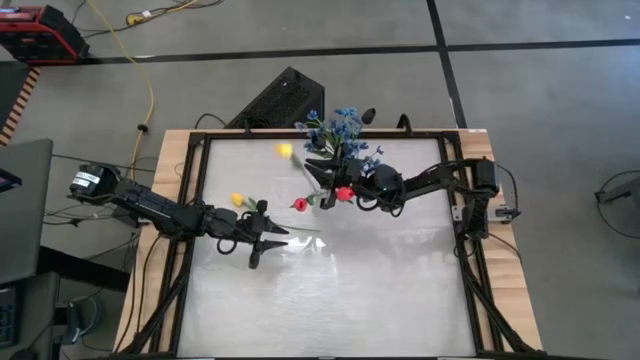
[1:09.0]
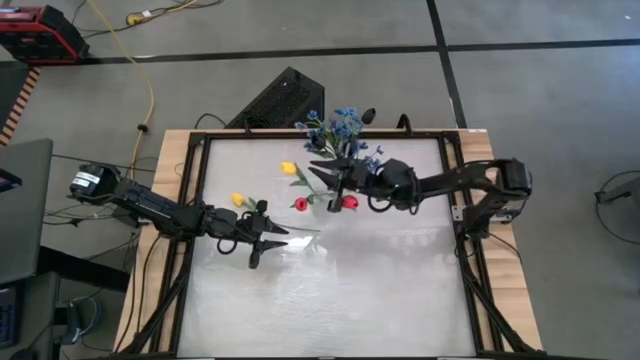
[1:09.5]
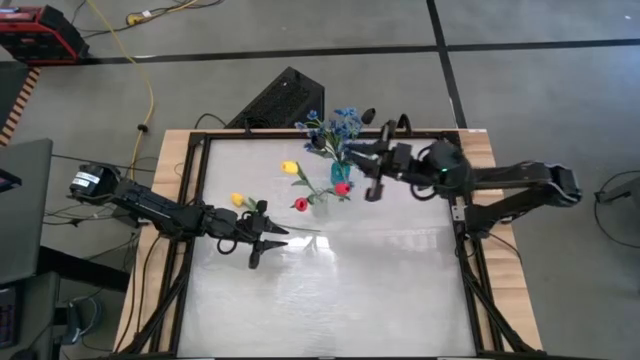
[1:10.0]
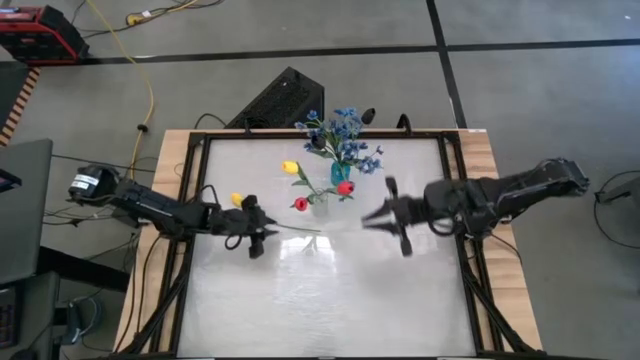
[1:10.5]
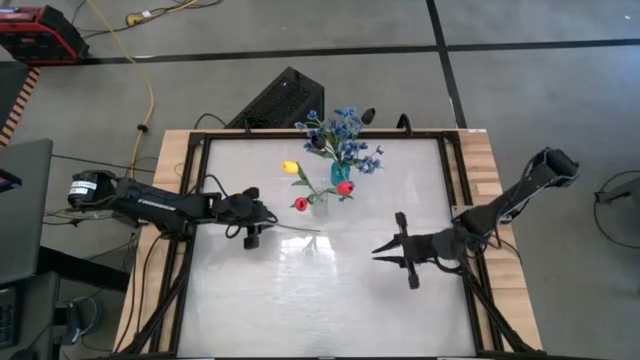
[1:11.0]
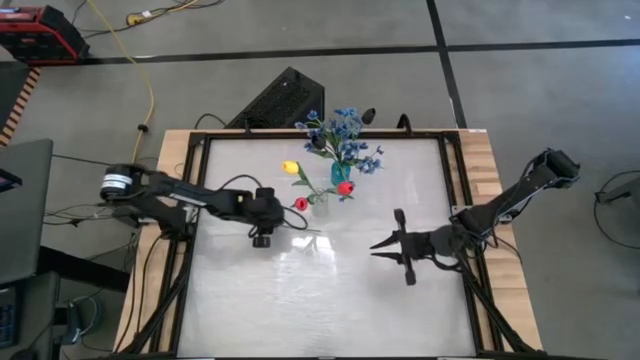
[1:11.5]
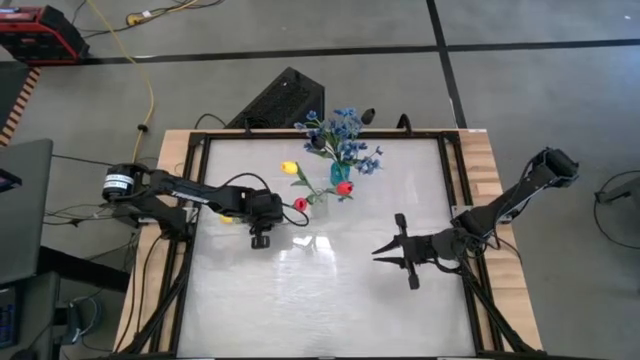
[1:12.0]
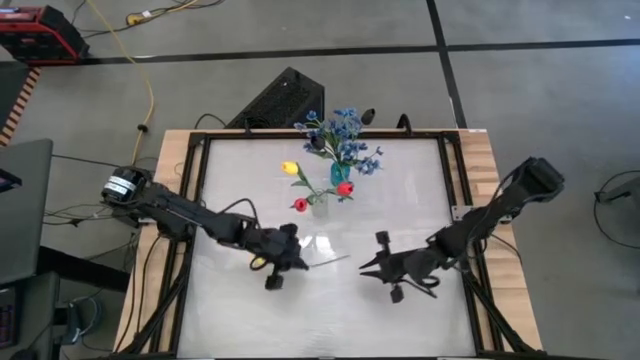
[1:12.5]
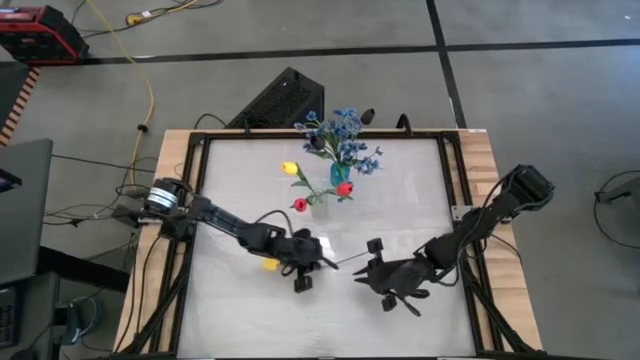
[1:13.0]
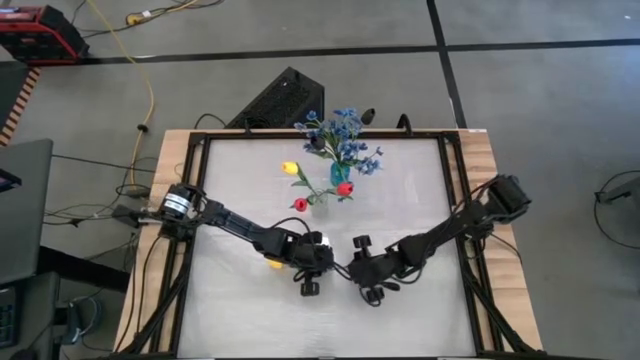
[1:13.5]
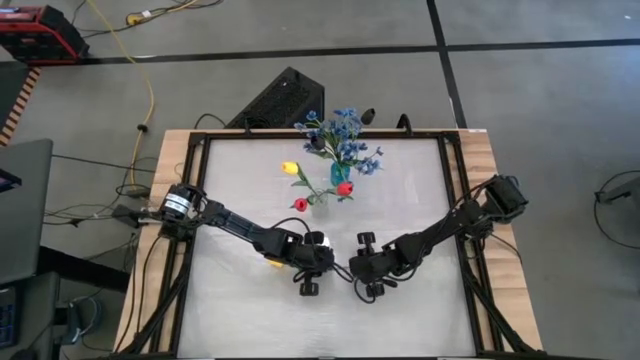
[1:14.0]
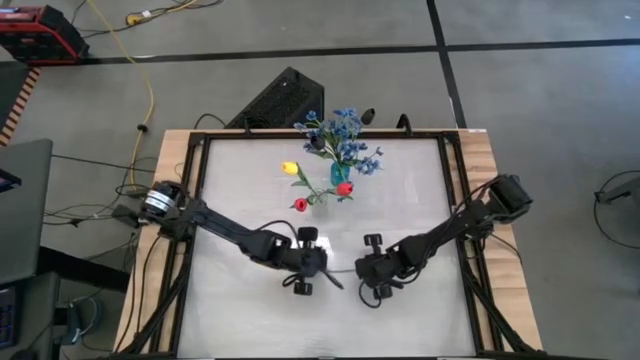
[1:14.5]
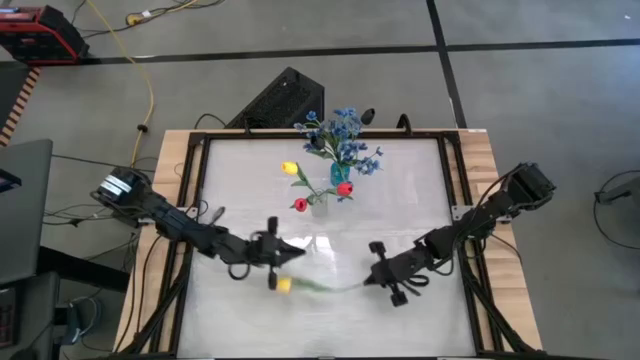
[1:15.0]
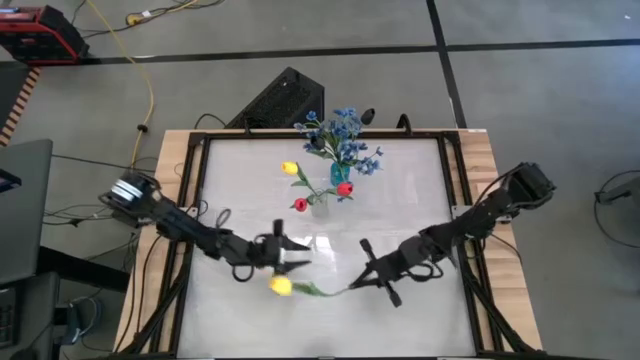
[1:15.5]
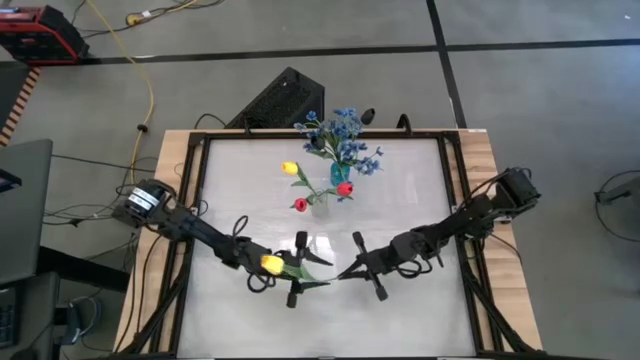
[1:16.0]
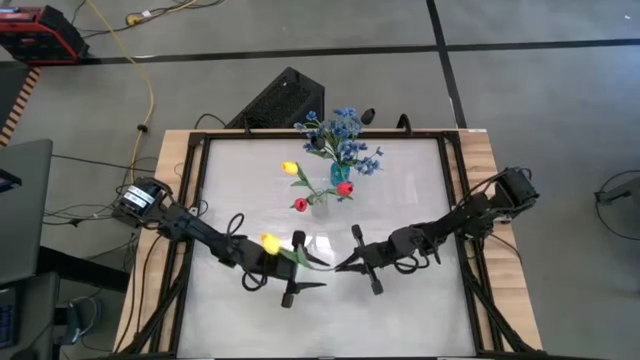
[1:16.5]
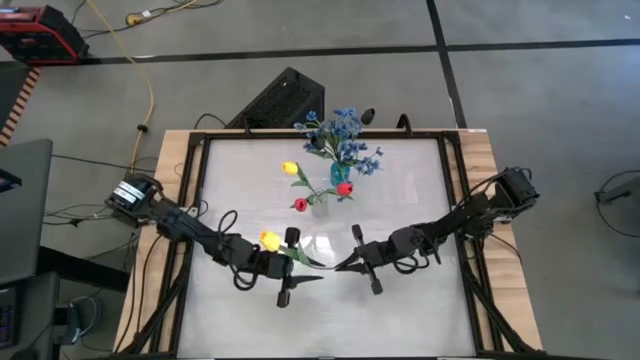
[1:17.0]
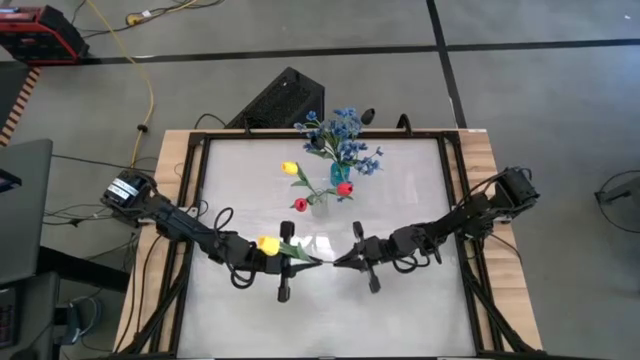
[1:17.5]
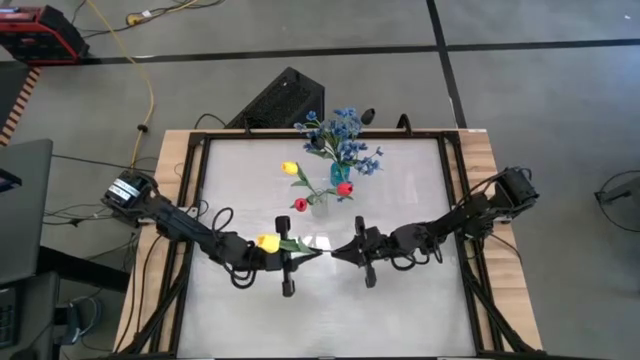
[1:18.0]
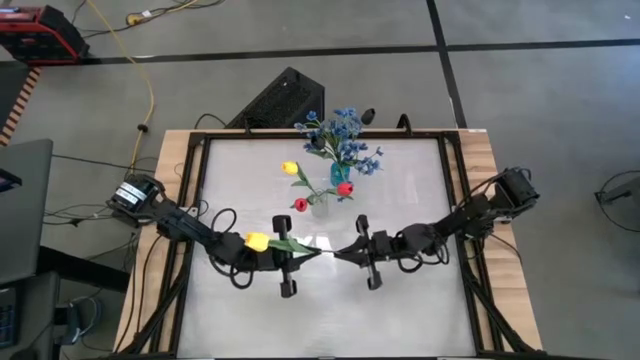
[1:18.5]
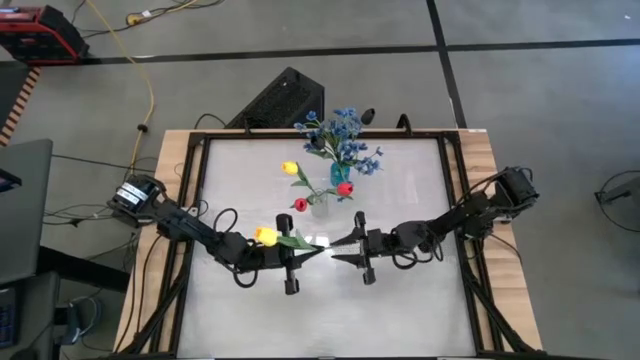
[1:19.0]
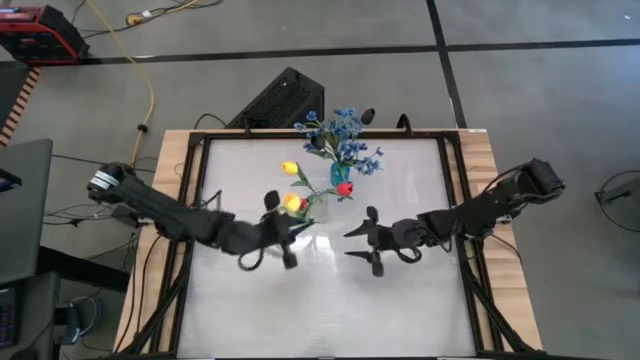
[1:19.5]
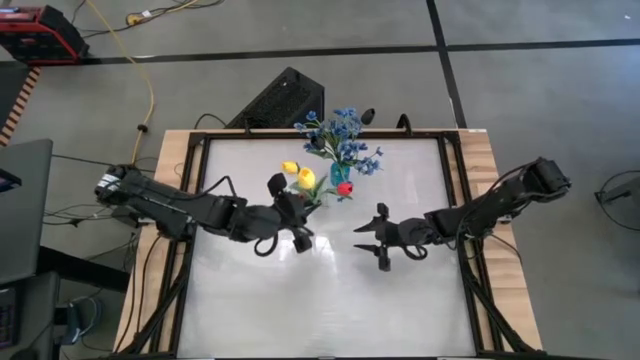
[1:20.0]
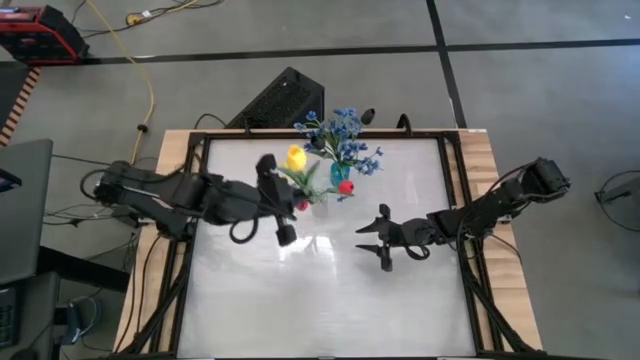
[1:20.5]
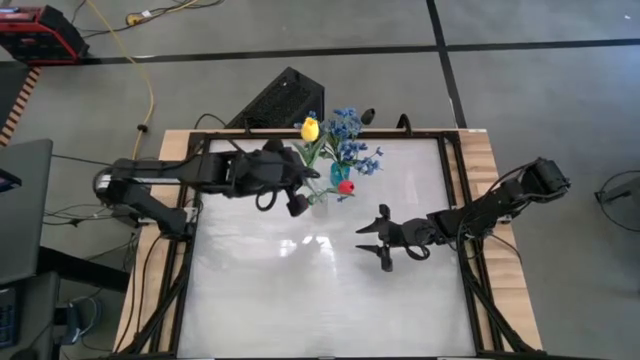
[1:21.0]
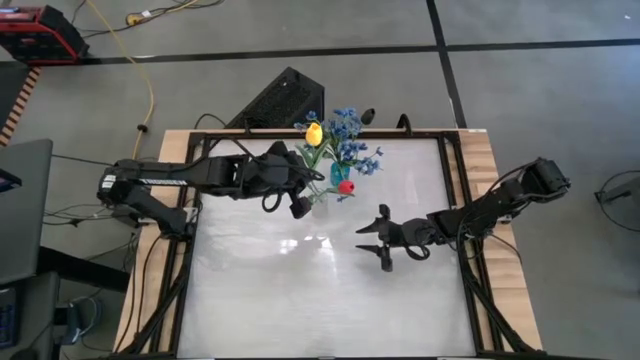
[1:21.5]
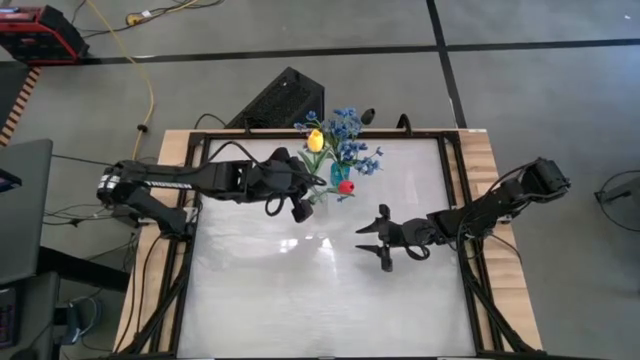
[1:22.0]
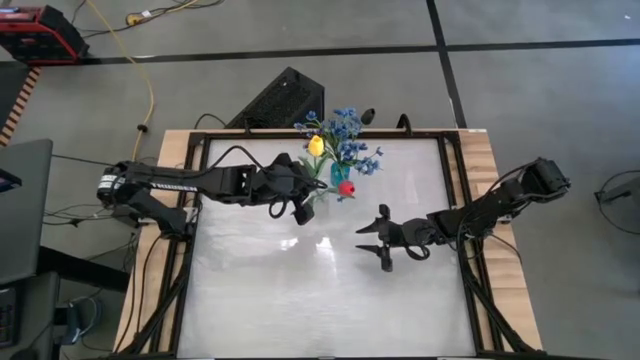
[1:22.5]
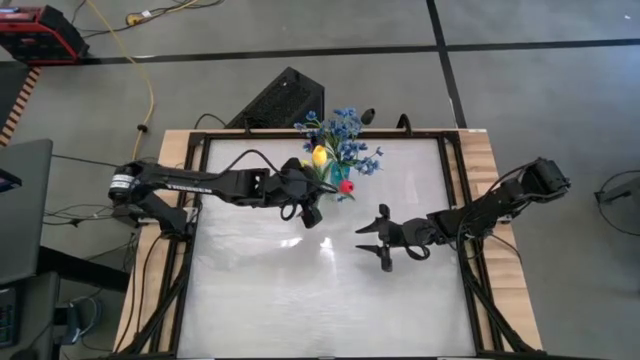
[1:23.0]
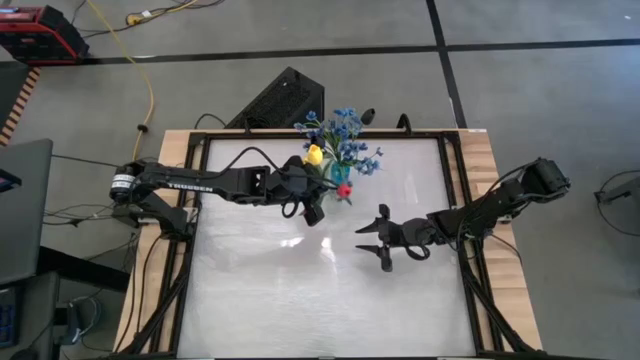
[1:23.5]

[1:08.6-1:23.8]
Task: Sort flowers into vase by color
Put the yellow flower into the transparent vase

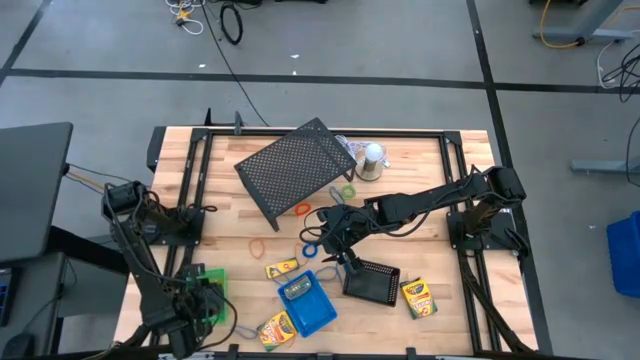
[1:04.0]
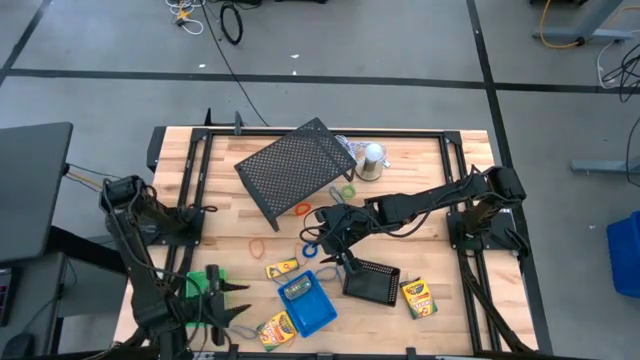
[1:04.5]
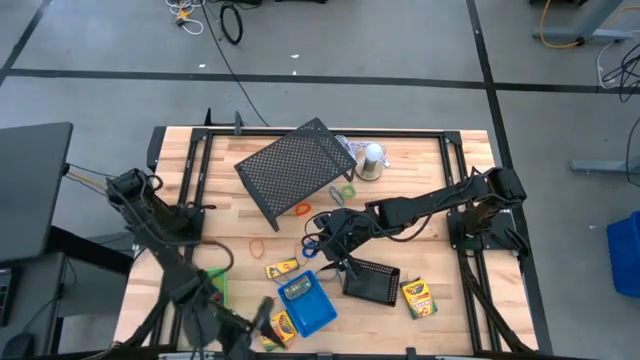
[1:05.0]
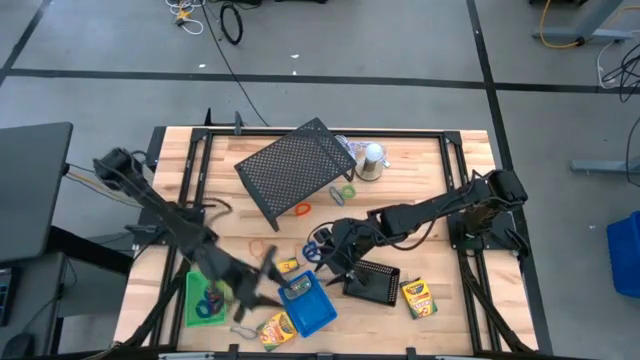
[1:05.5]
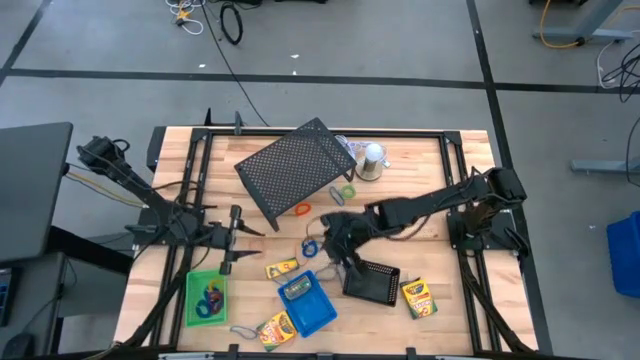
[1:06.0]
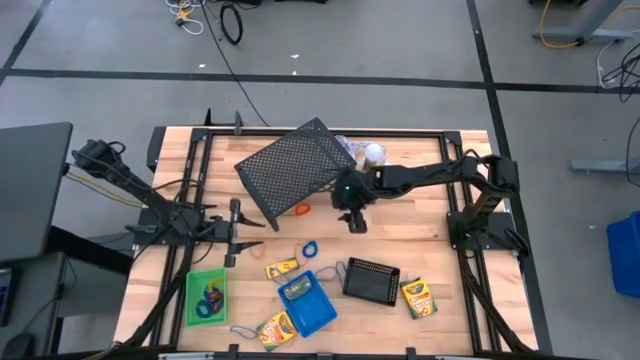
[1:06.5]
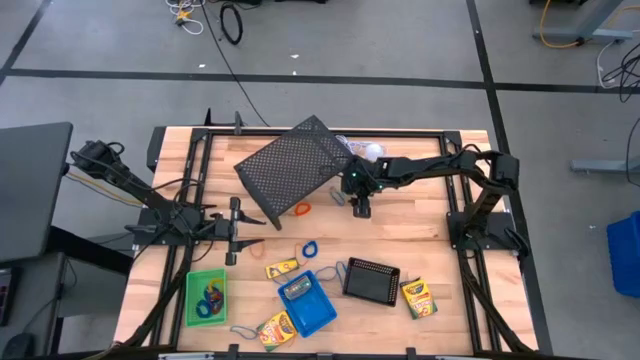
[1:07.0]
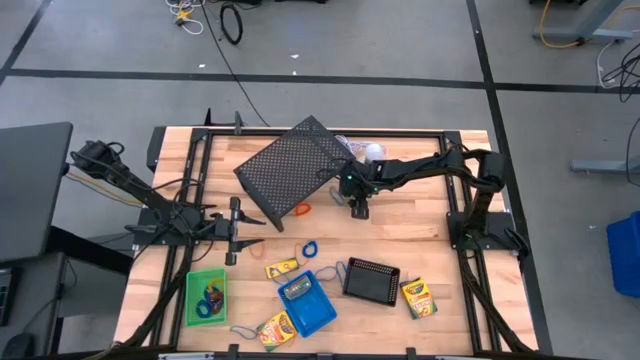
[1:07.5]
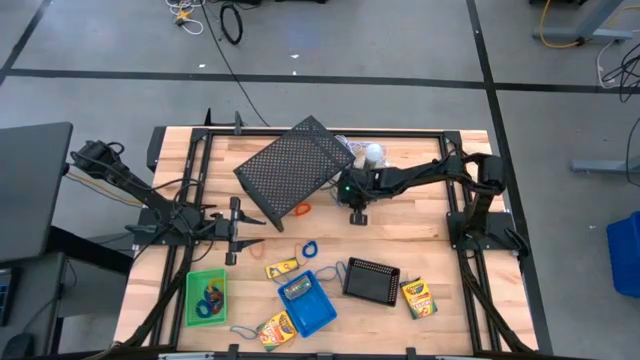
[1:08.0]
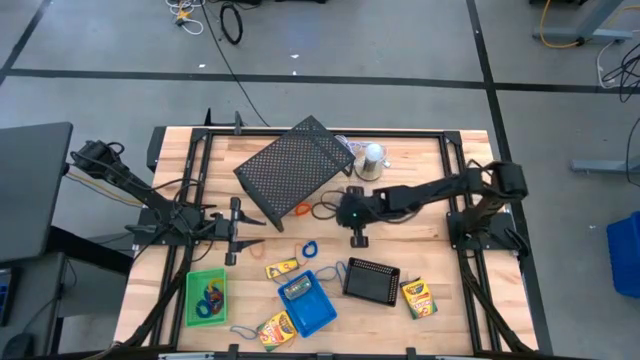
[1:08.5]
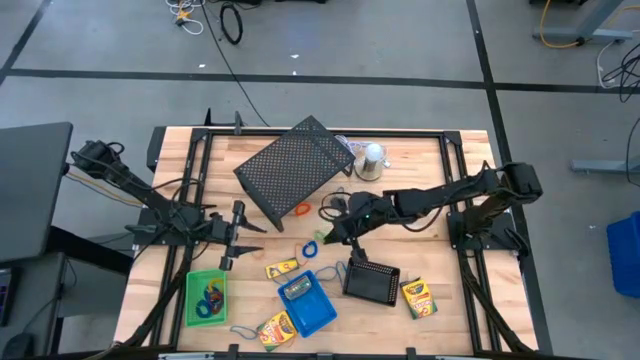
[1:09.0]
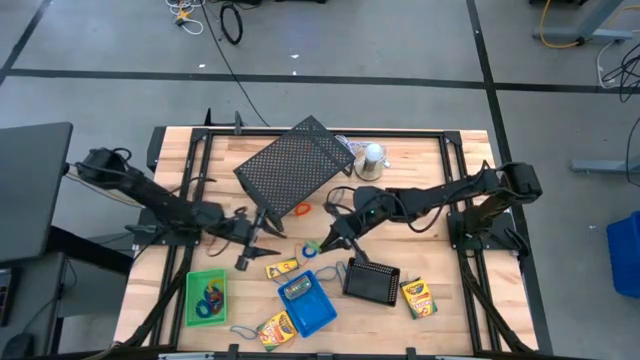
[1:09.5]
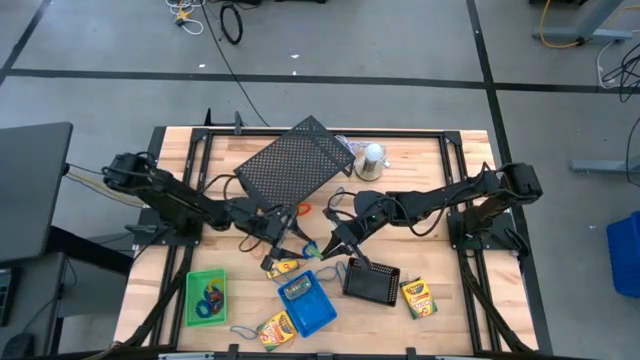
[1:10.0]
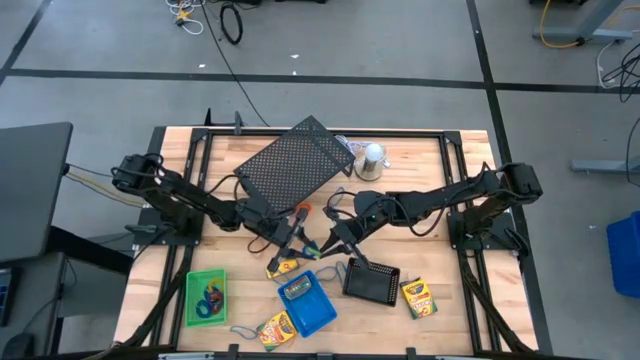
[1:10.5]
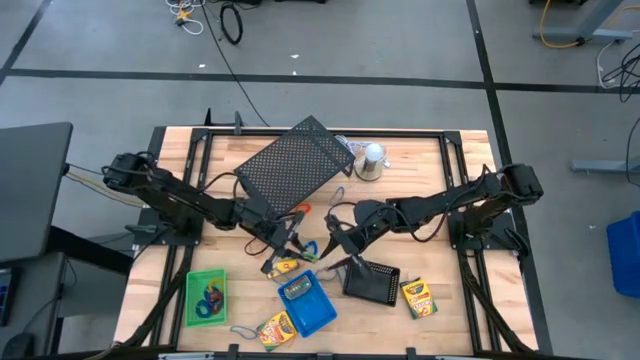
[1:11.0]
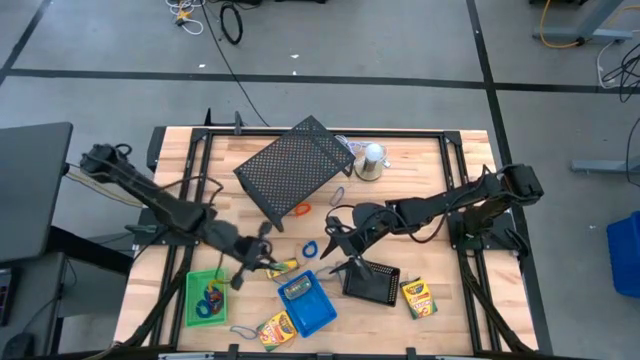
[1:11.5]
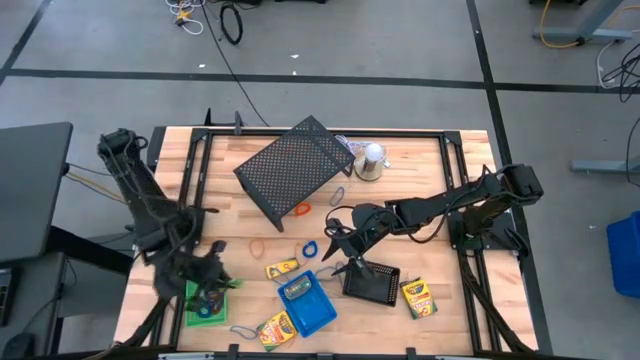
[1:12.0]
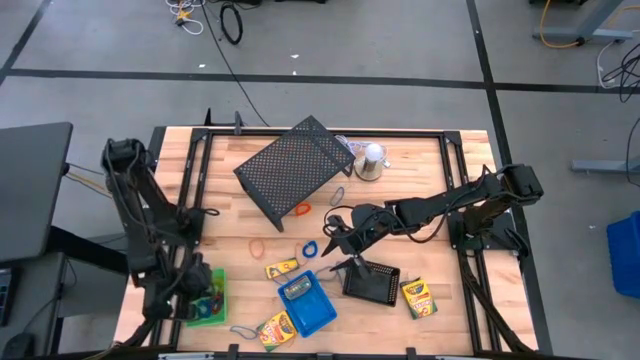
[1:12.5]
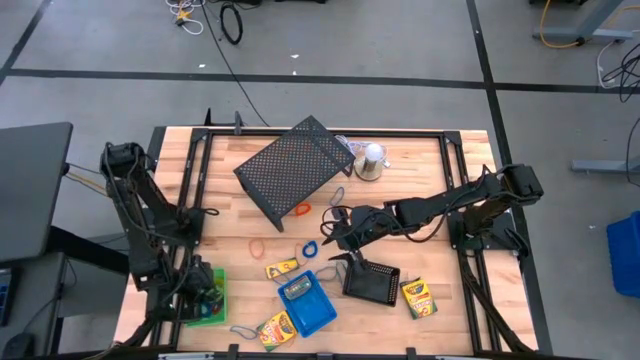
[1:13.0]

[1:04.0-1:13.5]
Task: Pick & Place Office Desk Supplies
Put the green spiral keychain into the green bin
